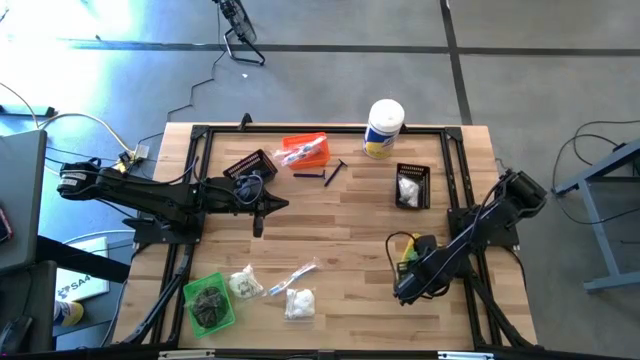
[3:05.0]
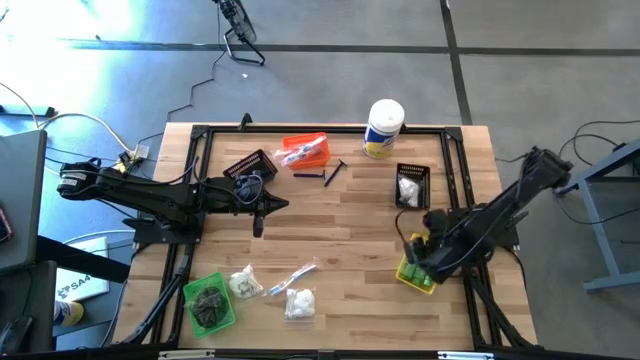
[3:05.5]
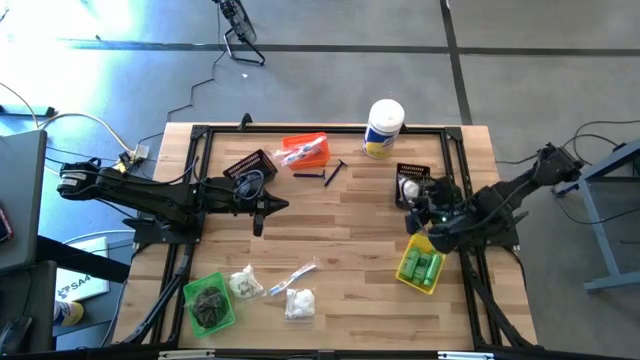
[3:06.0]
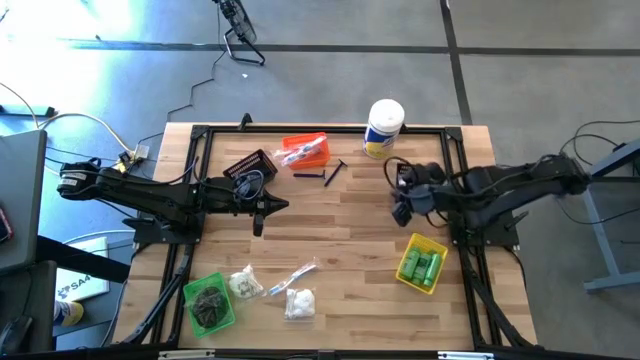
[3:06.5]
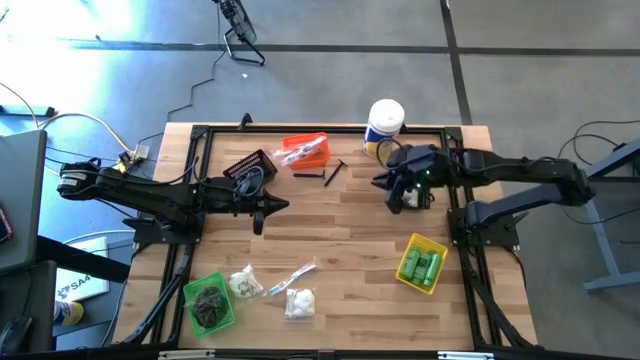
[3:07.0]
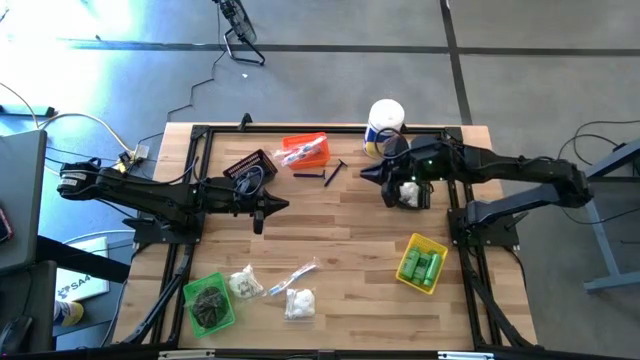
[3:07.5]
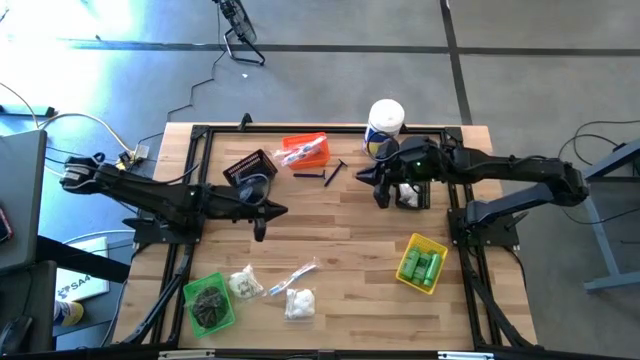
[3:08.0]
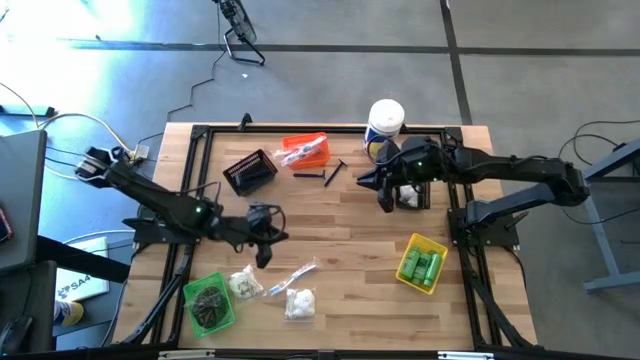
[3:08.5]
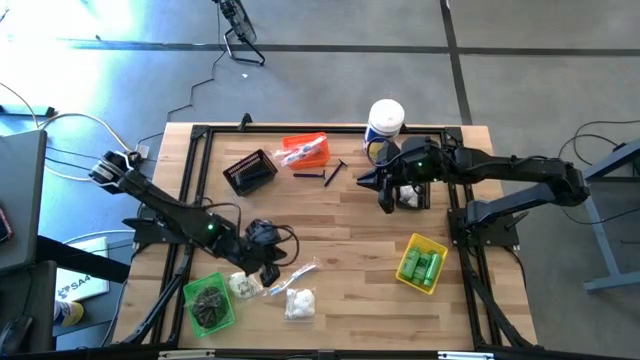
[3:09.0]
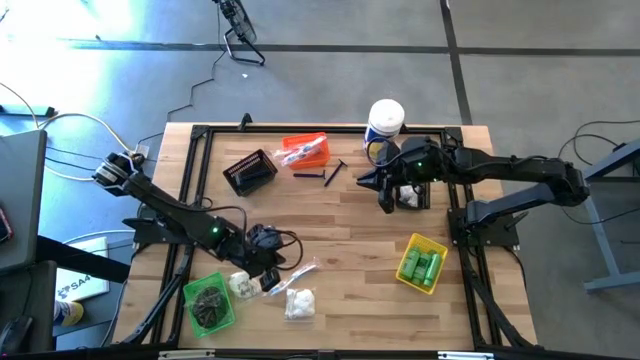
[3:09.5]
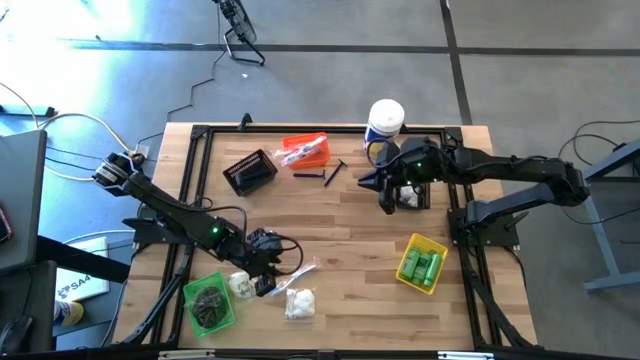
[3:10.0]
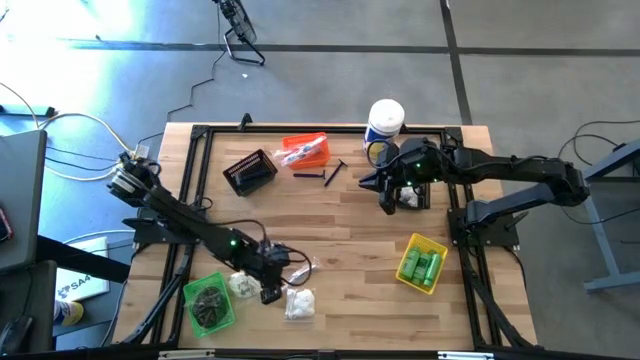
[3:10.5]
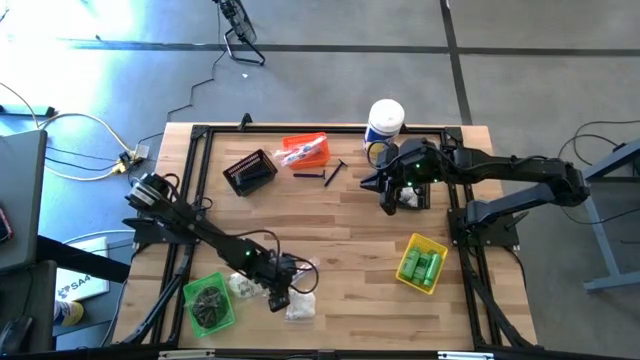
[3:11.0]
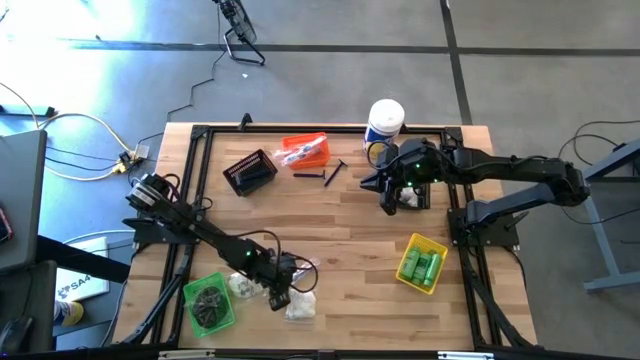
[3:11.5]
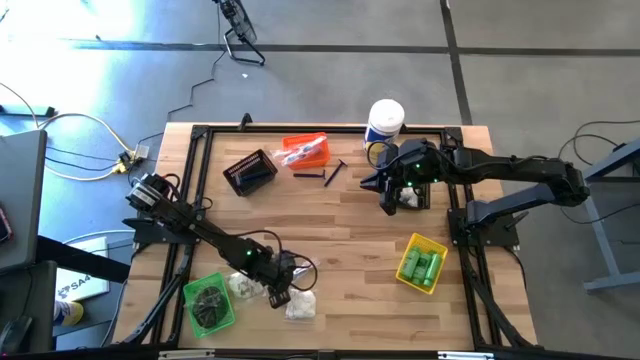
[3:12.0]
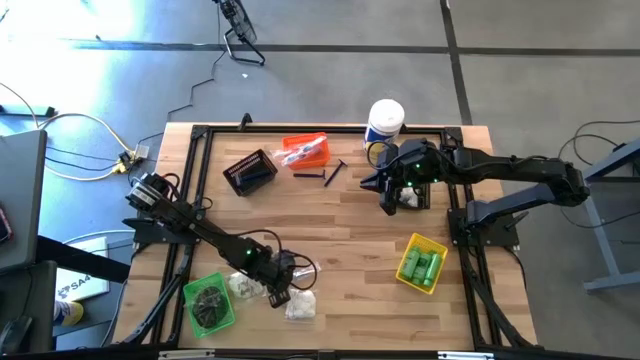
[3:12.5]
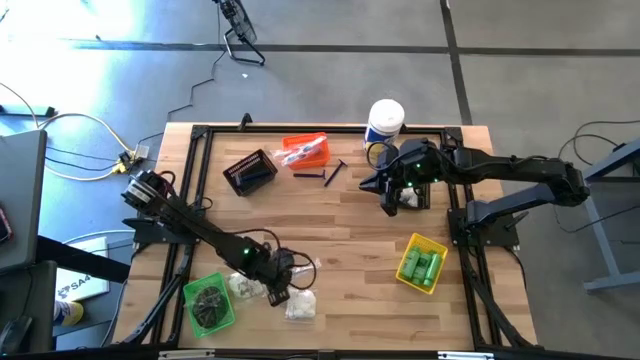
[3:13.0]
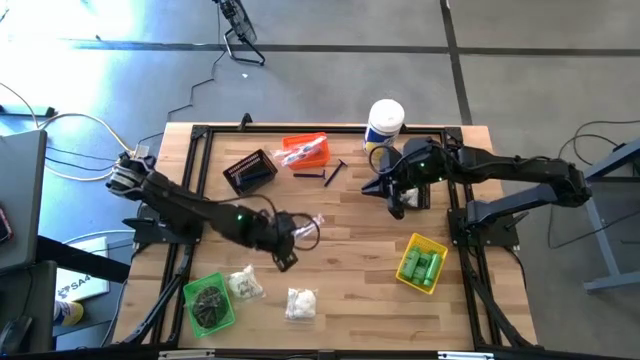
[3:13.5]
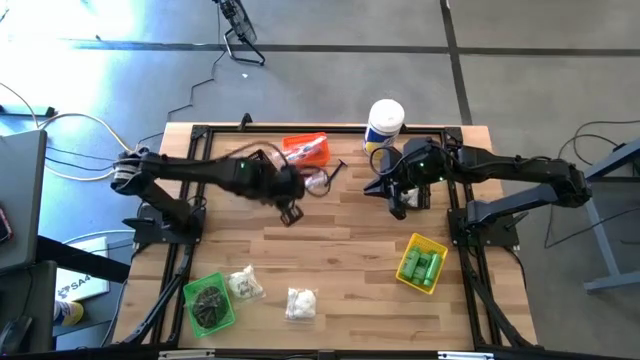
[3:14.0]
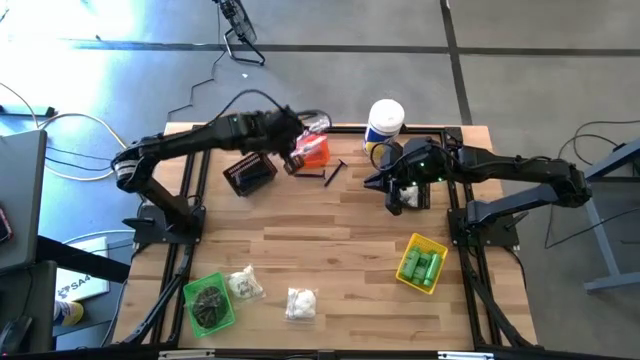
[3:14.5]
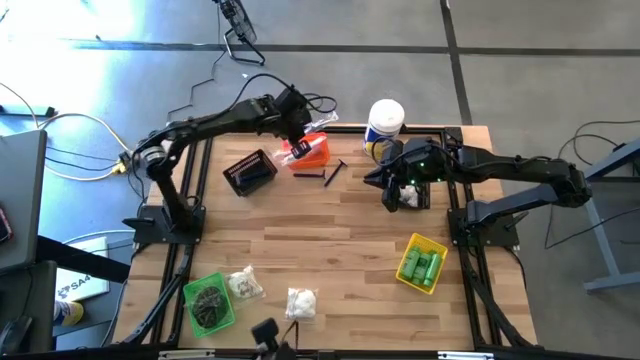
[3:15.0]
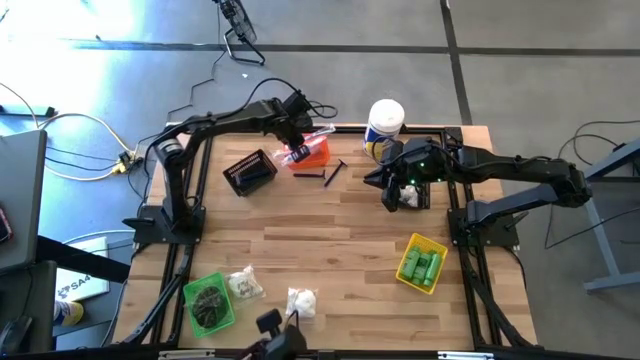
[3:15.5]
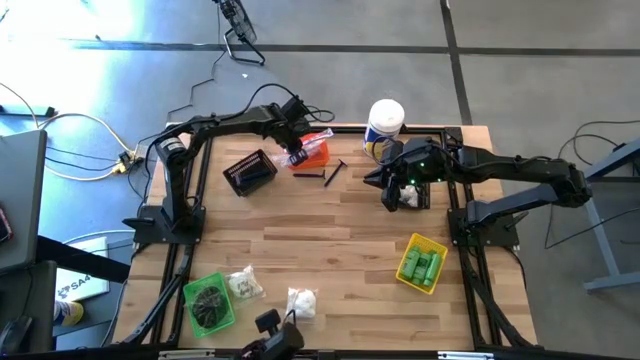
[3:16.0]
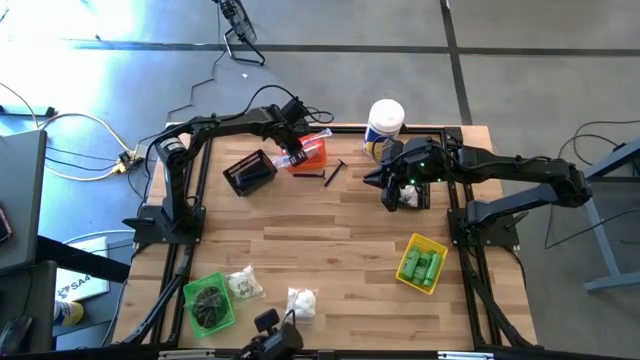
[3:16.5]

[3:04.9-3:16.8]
Task: Pick & Place Travel size toiletries
Put the blue toothbrush into the orange bin

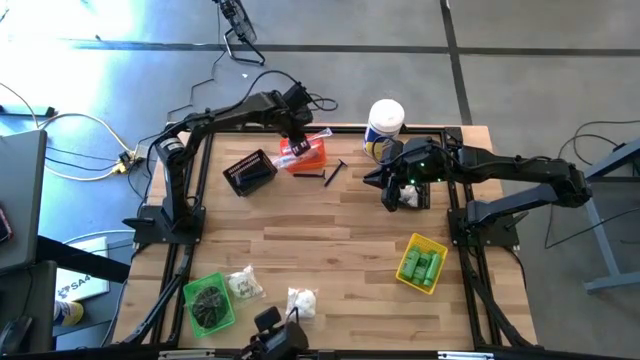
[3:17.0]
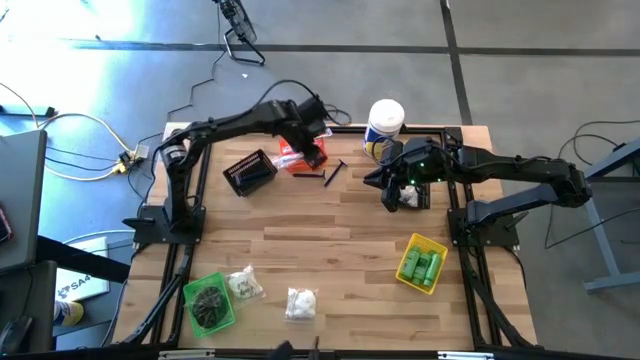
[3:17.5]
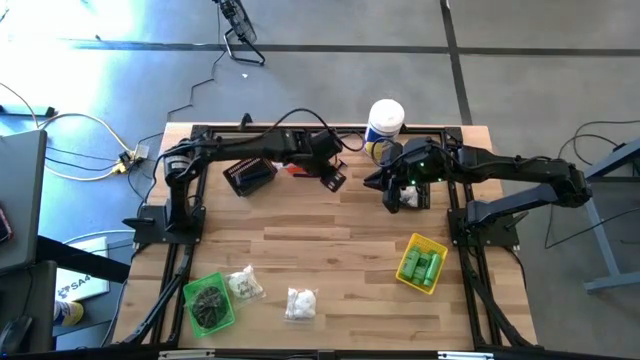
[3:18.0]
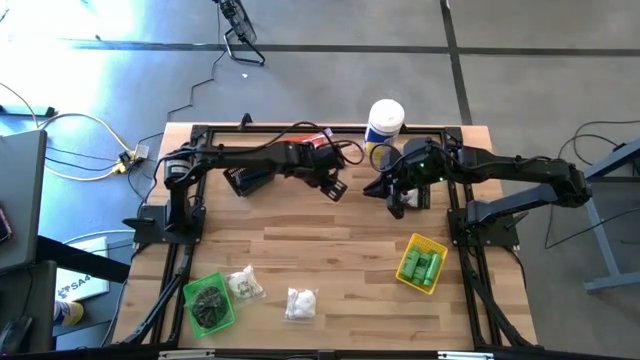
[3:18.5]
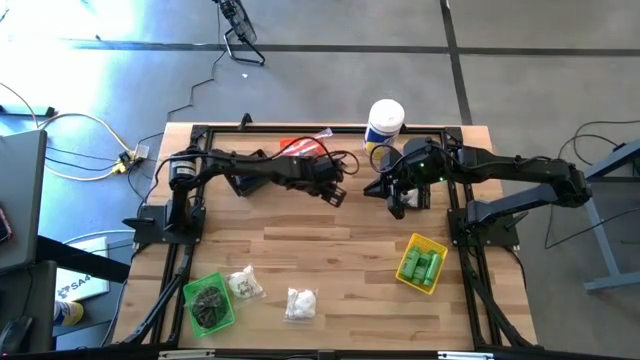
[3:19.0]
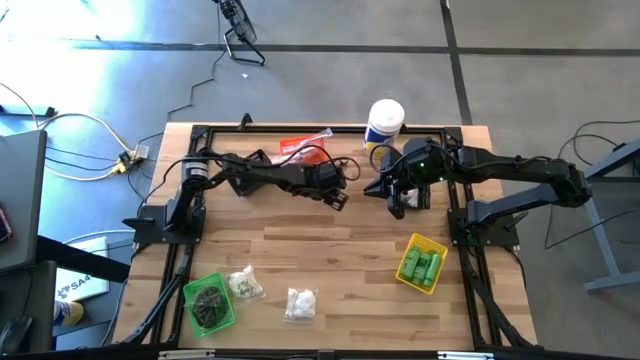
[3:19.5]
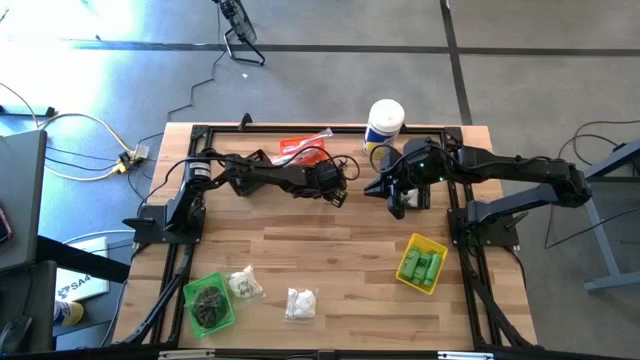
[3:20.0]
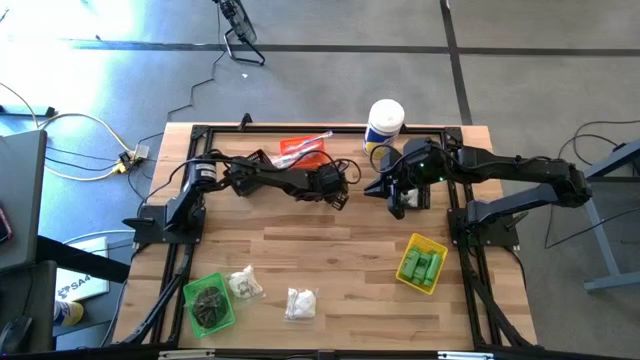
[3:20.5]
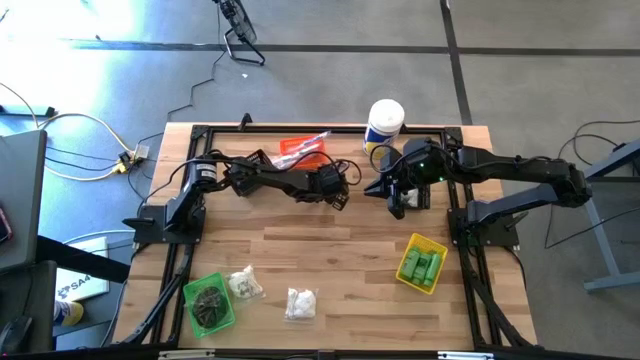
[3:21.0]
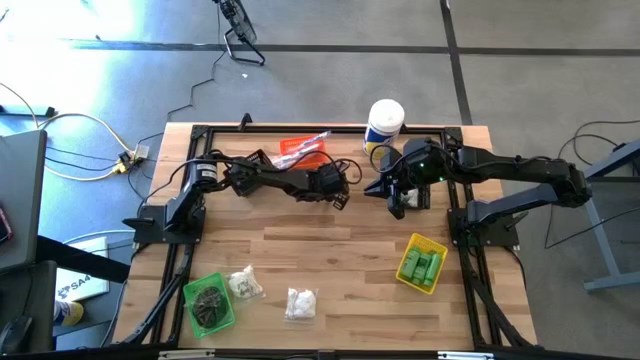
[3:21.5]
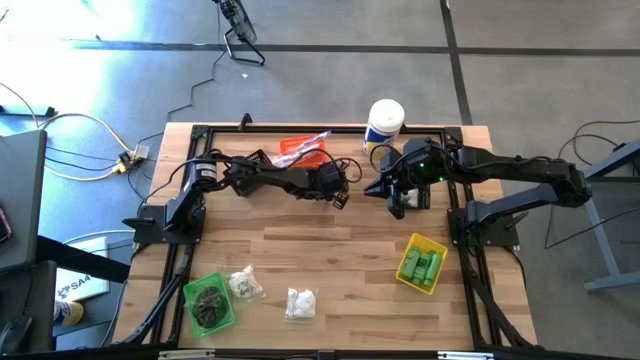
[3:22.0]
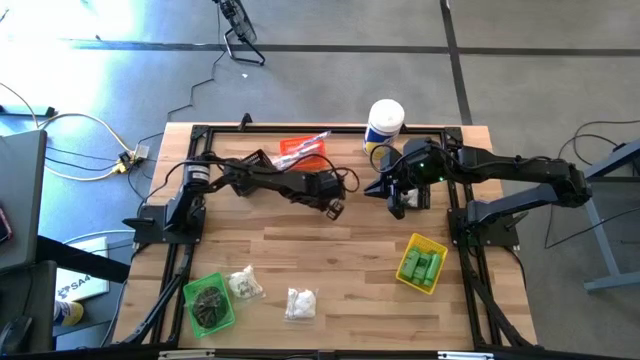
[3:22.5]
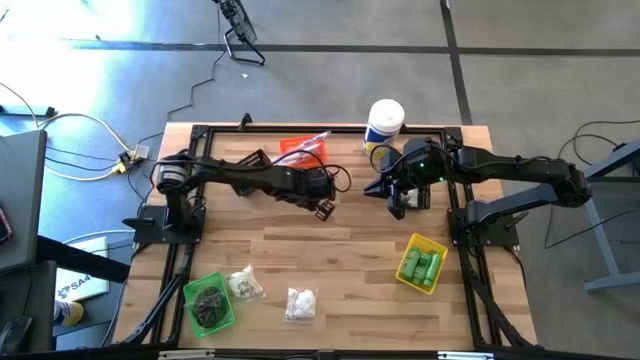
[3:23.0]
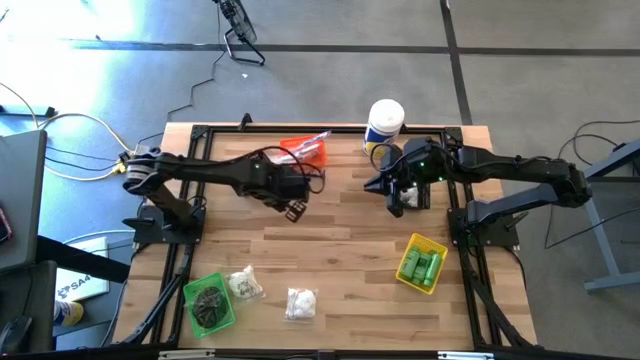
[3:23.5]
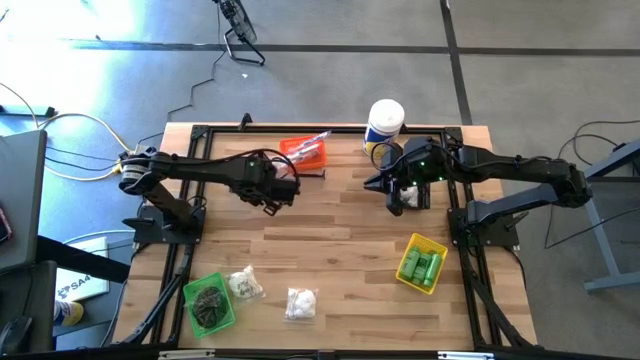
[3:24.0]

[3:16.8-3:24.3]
Put the blue razor into the left black bin

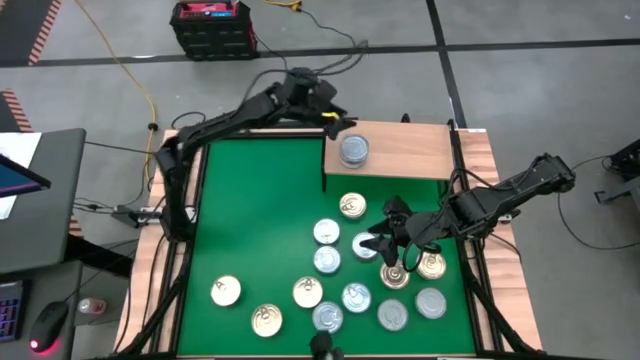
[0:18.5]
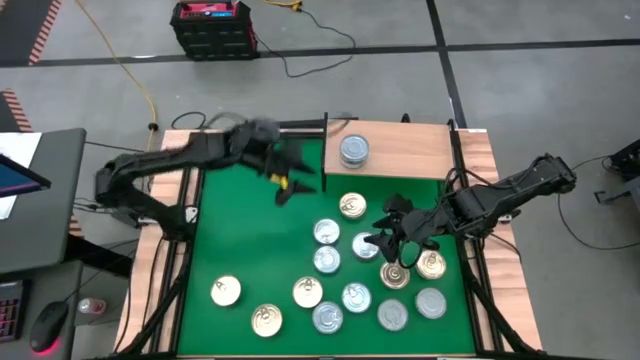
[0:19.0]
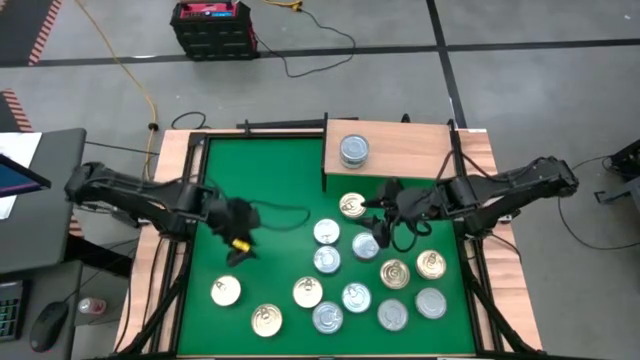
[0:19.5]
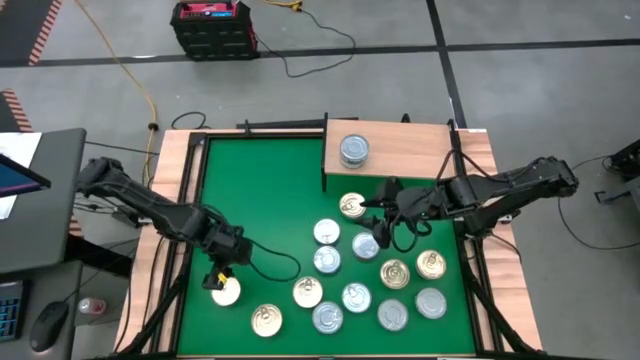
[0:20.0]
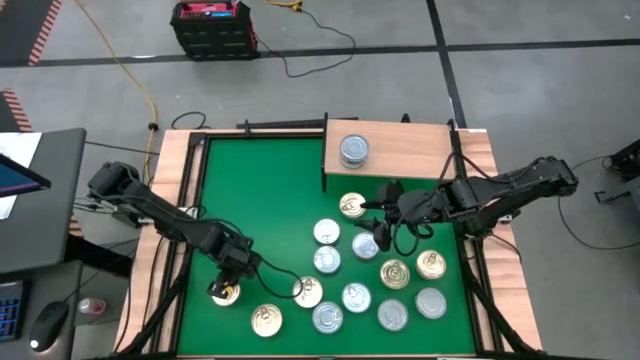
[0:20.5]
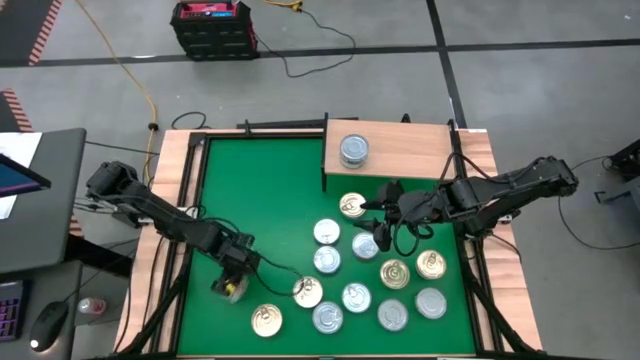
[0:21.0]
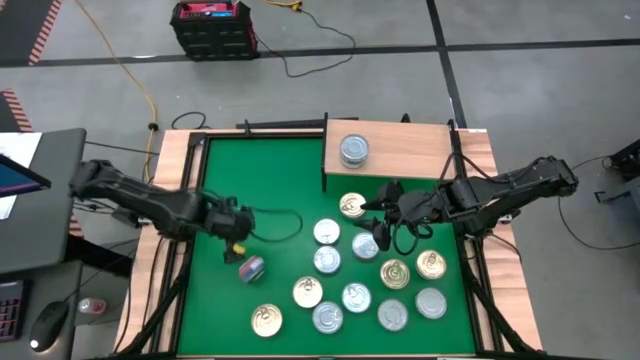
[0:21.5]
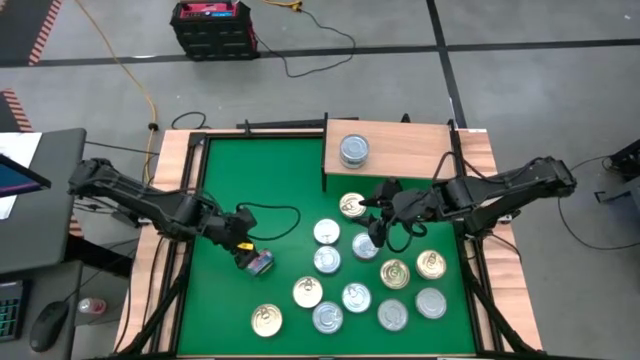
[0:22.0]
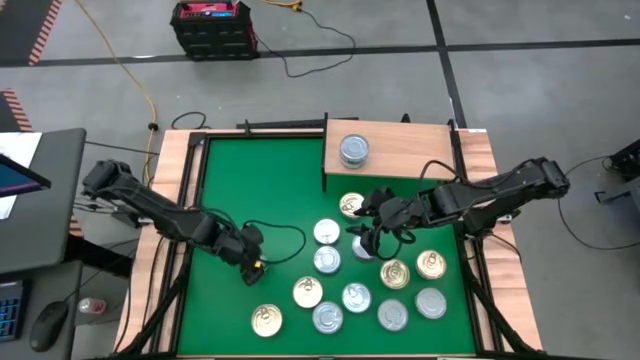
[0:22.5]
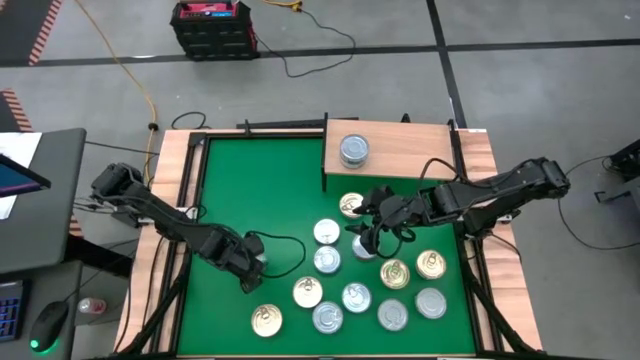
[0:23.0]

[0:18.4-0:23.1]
Task: Stack canned seafood by type on shelf
Put the pink tuna can on the shelf
